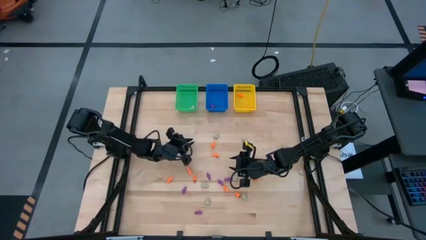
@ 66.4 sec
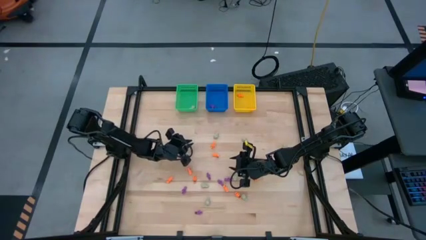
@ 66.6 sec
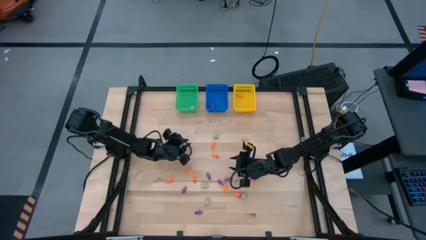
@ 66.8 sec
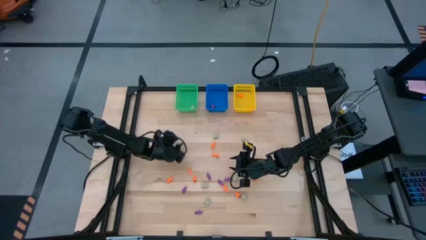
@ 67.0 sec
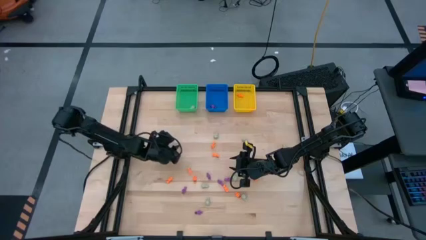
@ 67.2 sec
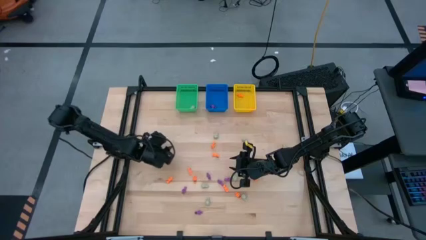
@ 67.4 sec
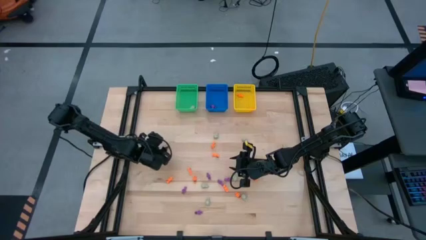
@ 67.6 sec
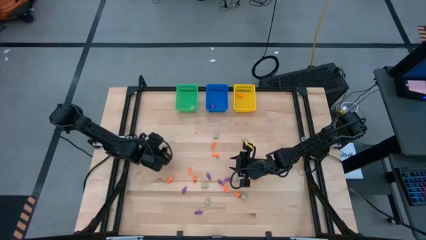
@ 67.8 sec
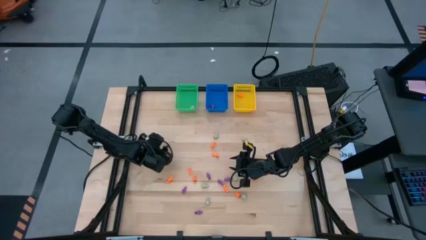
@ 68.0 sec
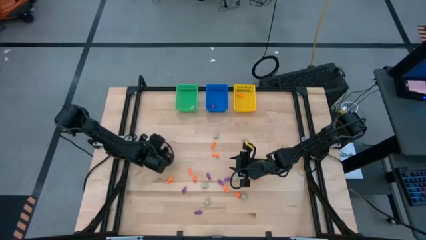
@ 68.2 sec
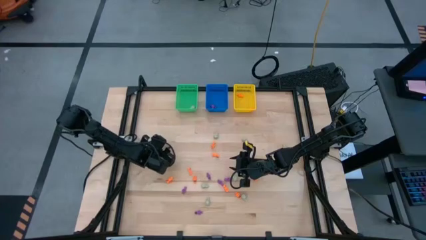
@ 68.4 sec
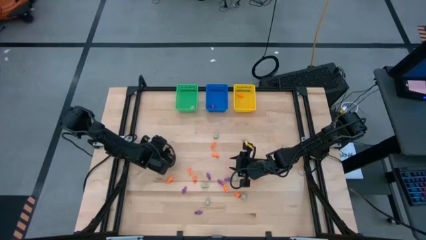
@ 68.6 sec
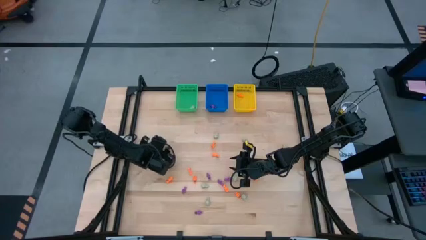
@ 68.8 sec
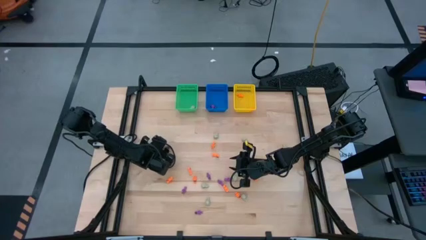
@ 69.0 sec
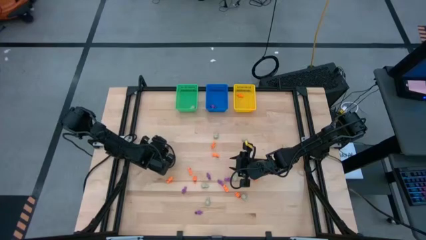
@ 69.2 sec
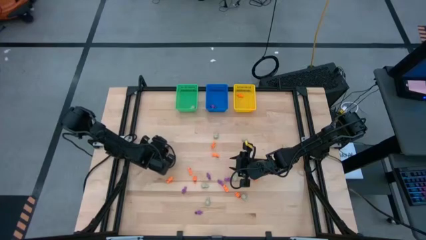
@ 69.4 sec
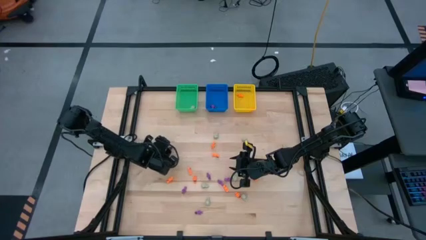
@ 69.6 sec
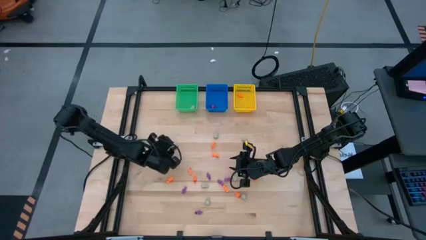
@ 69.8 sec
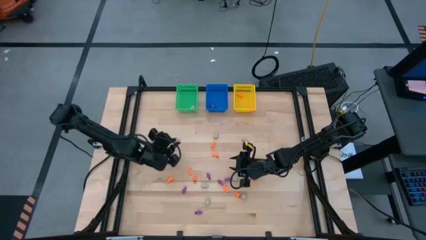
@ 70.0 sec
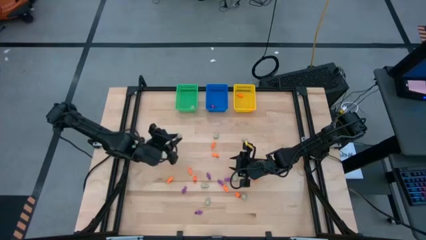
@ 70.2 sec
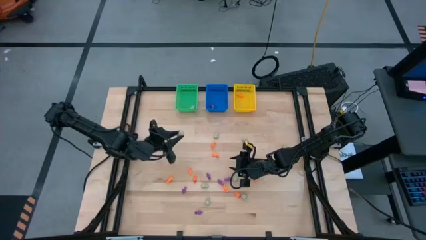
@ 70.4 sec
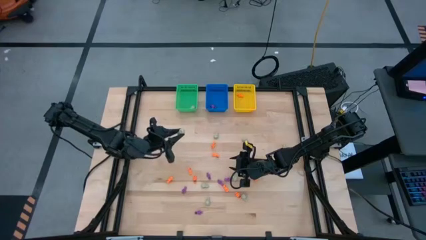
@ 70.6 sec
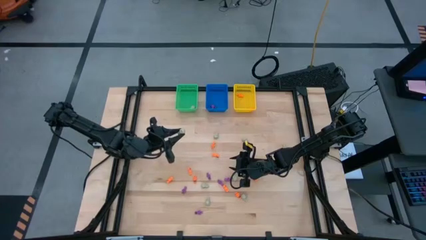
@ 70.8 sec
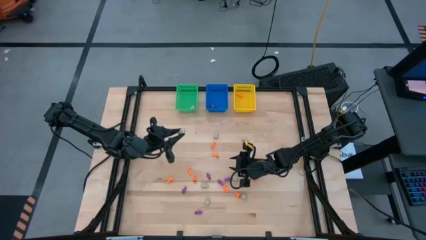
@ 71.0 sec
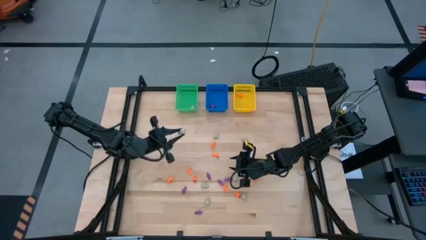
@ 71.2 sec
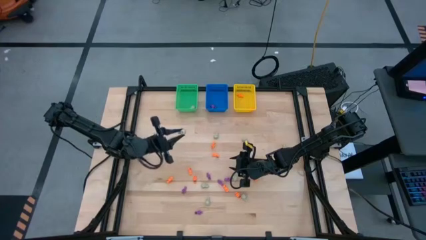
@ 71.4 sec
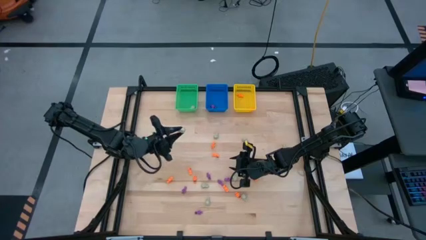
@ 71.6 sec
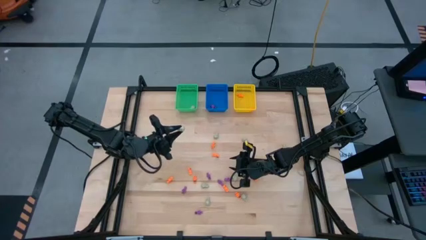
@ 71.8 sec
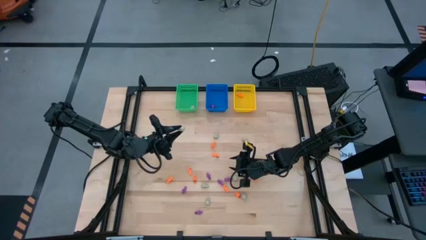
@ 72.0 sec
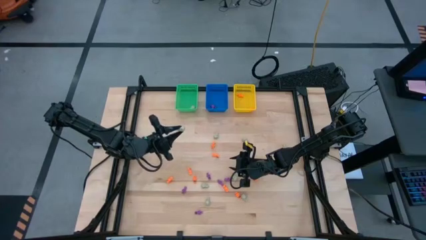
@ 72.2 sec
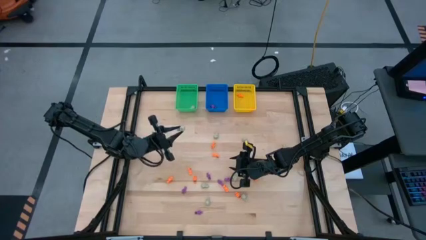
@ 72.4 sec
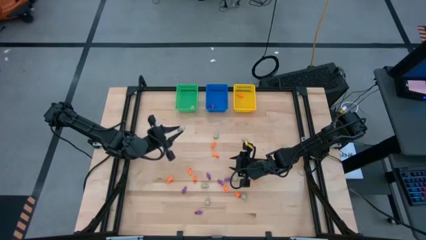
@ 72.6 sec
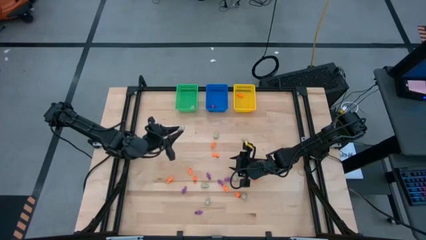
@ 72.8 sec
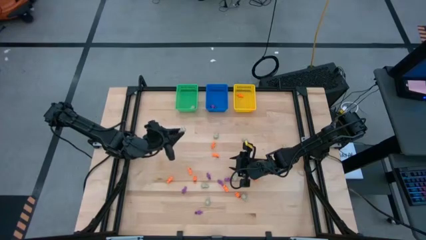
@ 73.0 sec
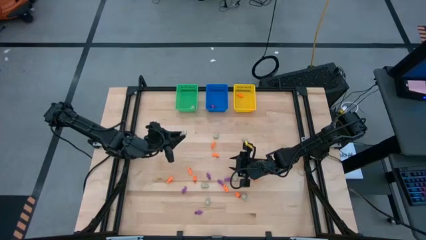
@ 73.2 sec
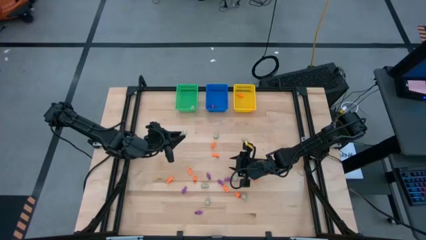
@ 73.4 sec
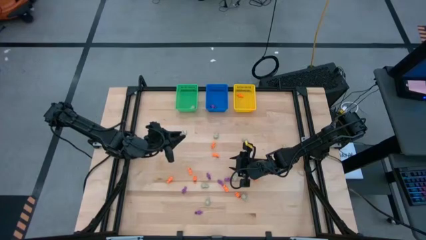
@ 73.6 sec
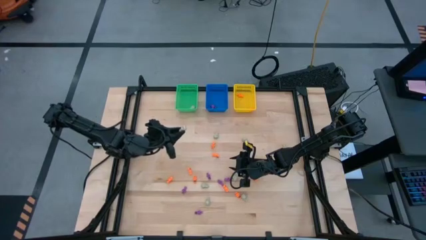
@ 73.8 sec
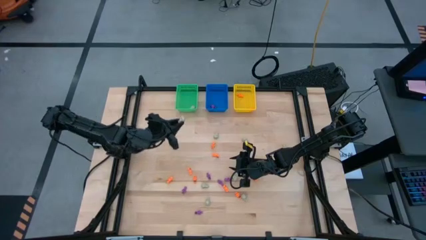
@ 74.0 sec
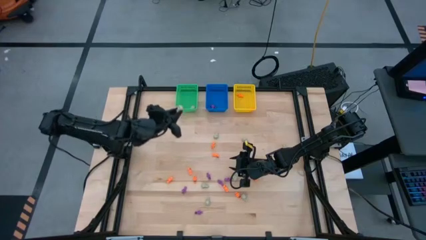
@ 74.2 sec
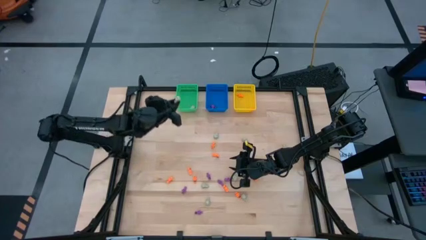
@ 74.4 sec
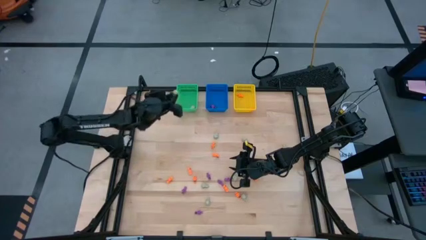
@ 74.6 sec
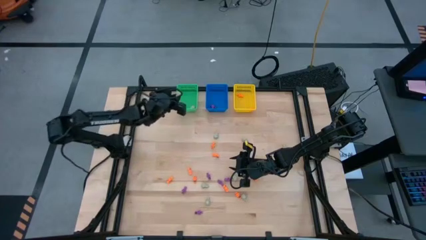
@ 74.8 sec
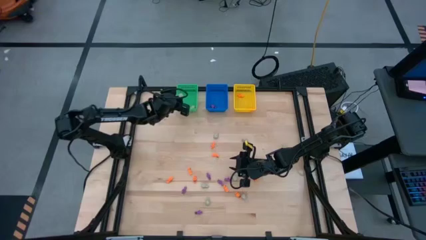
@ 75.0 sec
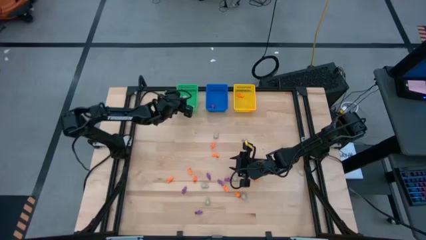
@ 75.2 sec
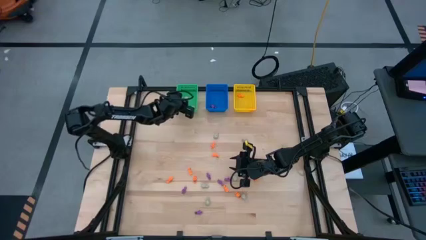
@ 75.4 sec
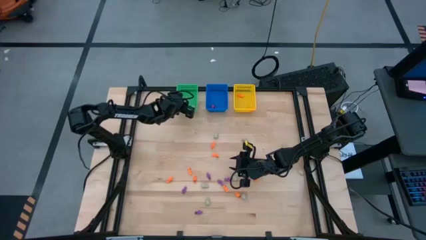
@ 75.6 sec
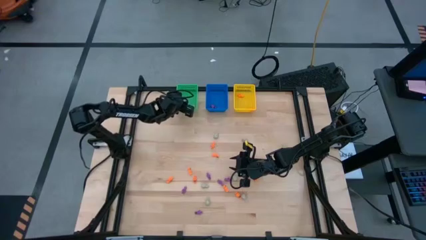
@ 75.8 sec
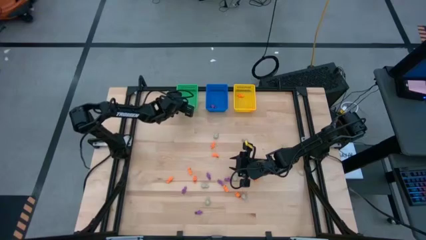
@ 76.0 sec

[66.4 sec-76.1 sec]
Task: Sort Halloween decoration
Put the gray skull toy into the green bin

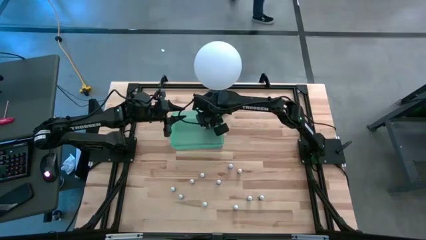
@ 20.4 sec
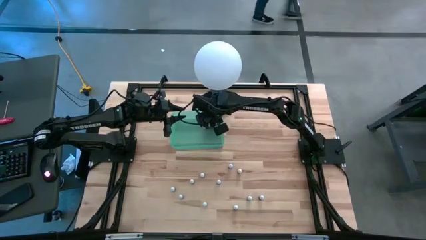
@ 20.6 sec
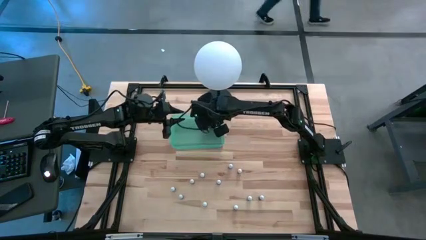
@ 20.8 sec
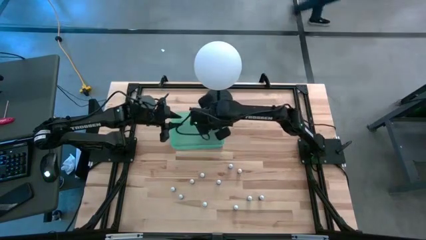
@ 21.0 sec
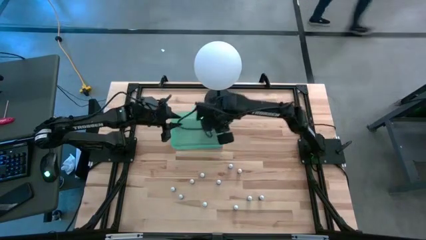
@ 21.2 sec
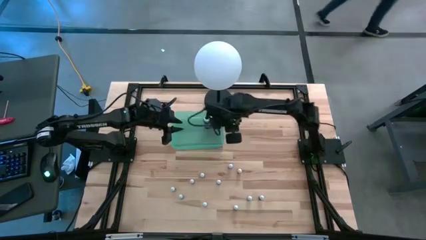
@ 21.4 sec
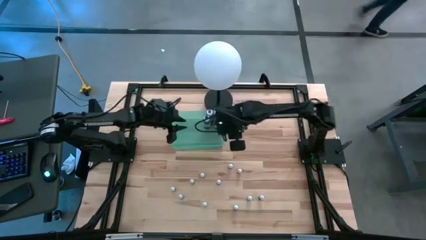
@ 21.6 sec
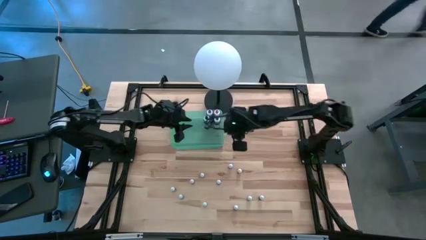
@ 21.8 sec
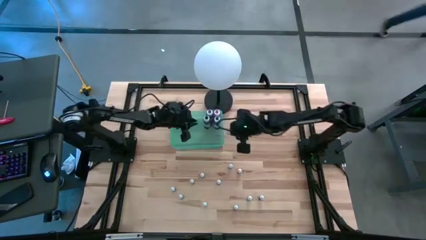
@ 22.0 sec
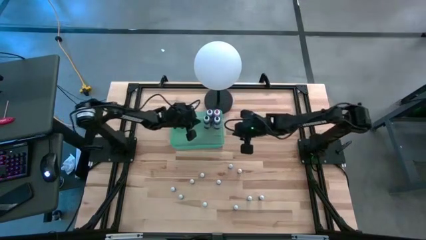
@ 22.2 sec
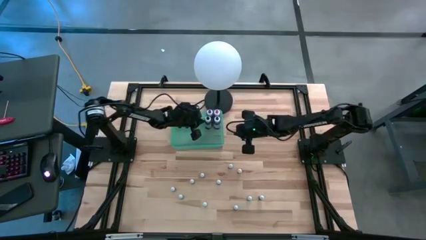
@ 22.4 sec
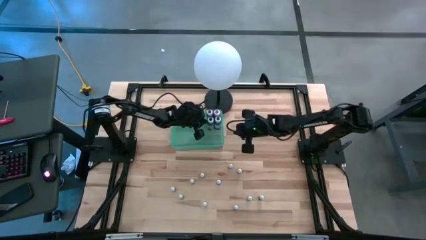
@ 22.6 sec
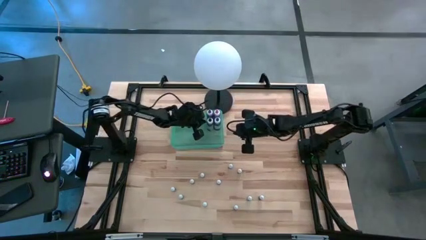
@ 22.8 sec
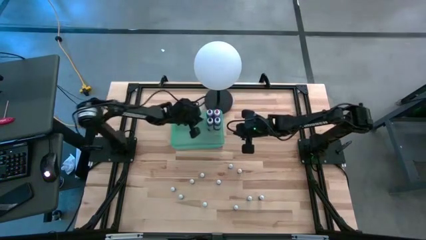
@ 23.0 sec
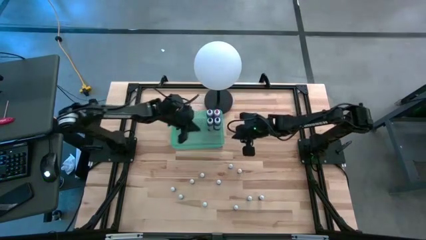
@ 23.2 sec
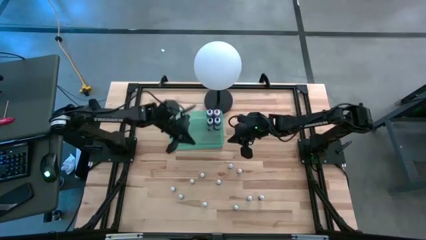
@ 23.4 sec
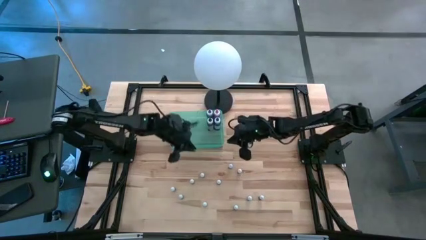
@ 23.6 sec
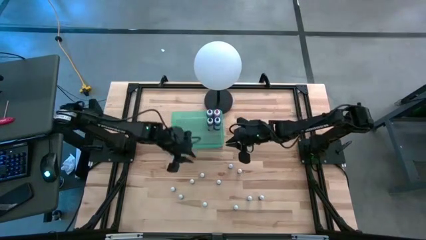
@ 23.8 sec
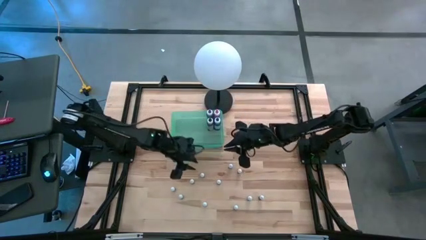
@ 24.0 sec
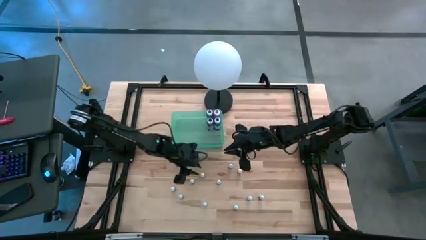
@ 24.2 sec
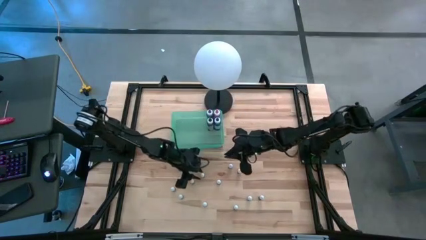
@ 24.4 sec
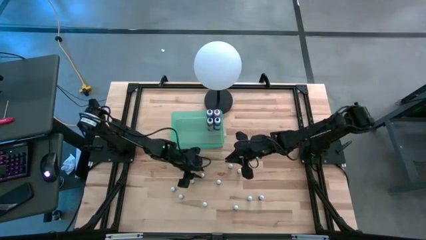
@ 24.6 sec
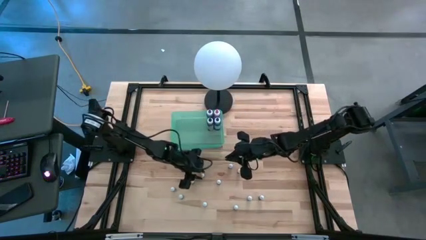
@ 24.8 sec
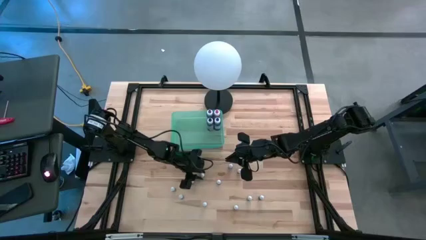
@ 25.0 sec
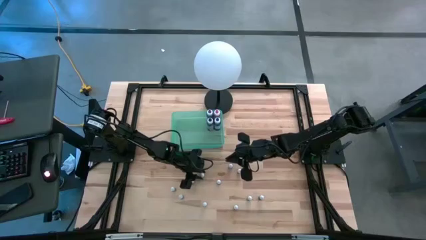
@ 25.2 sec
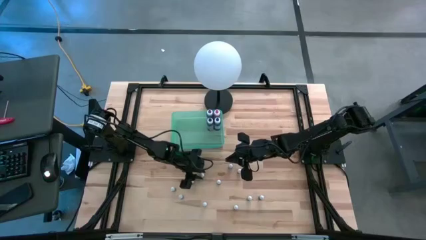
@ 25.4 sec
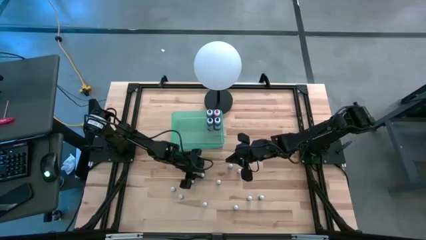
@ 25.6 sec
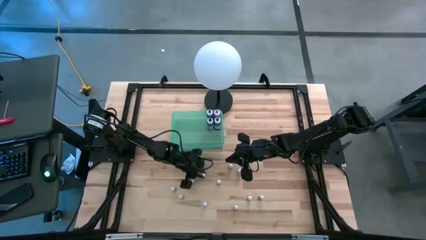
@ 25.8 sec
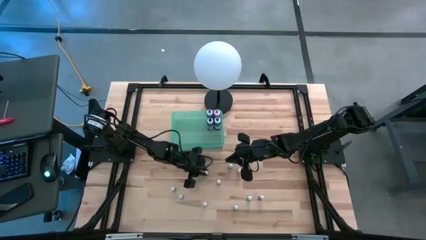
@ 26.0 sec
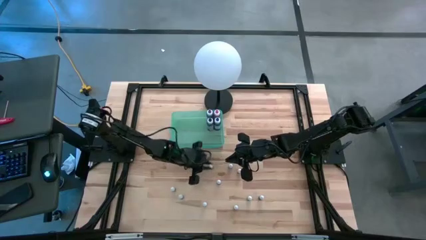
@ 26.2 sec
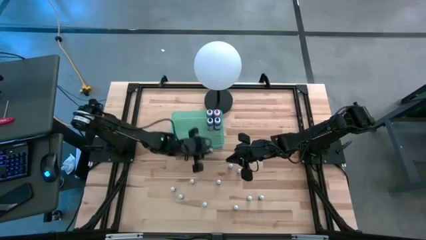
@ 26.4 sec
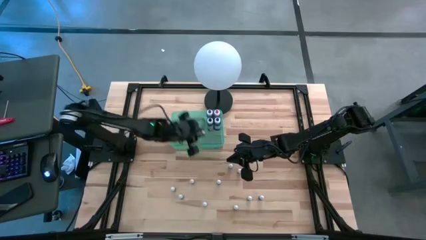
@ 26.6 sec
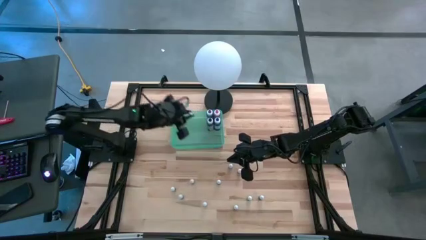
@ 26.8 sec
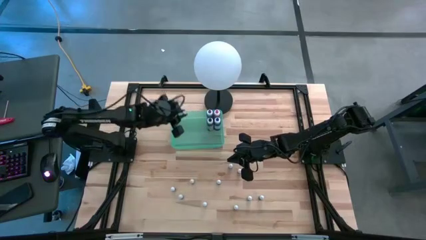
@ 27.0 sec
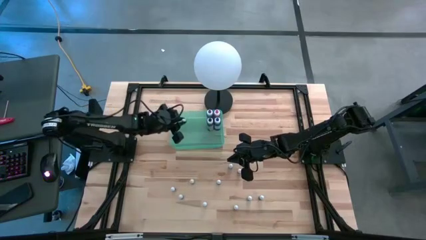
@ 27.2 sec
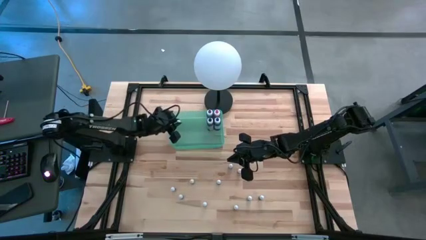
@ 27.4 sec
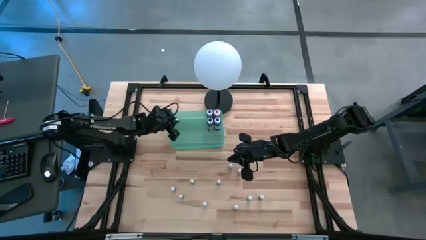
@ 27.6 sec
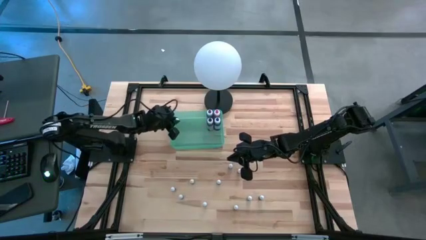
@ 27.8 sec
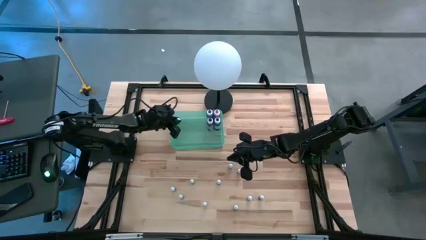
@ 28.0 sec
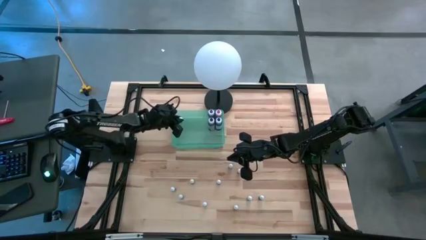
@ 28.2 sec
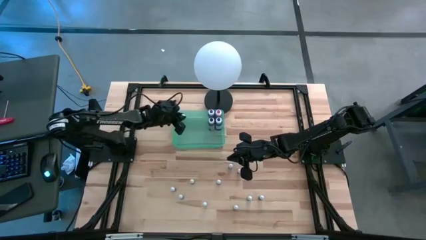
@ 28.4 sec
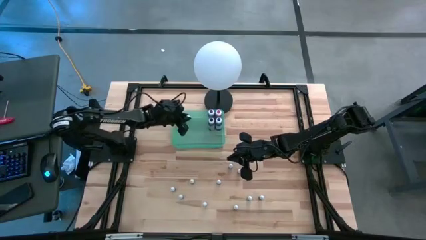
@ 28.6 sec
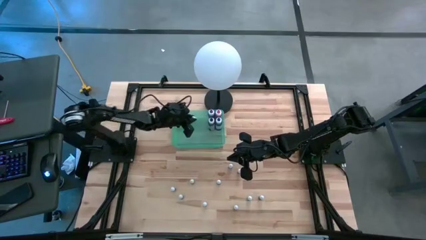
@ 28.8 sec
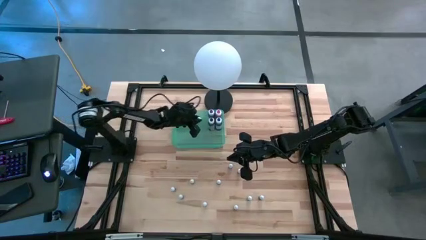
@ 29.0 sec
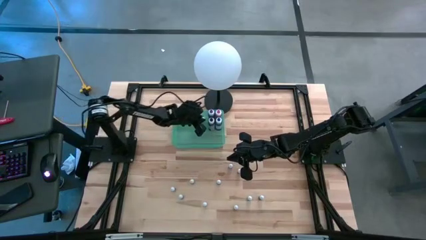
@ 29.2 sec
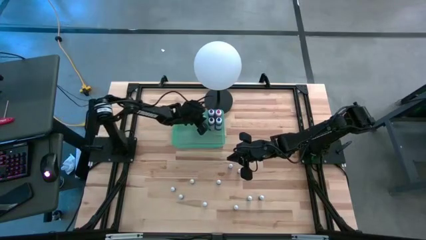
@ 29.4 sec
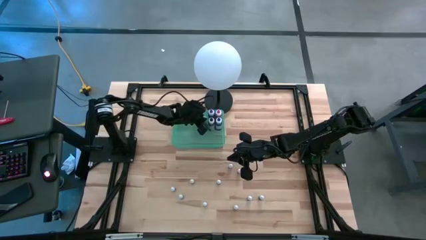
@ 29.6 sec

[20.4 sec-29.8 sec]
Task: Pick & Place food coloring
Put the green food coloring bottle into the green bin
